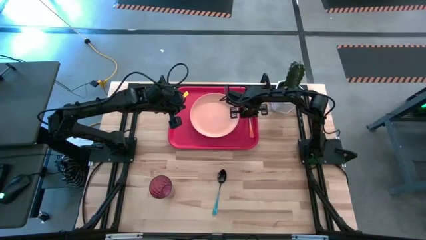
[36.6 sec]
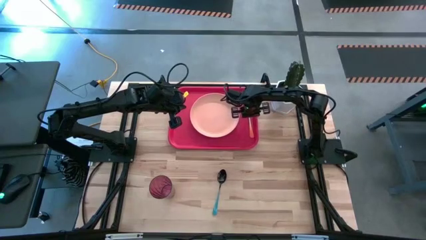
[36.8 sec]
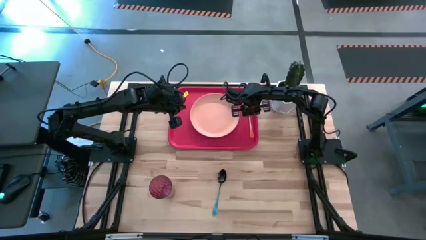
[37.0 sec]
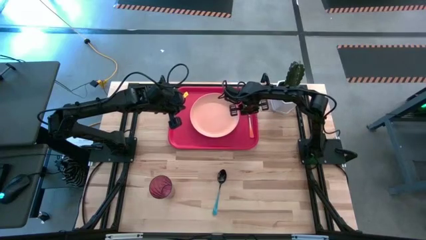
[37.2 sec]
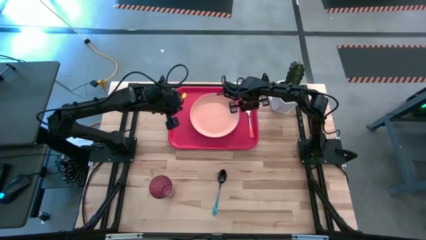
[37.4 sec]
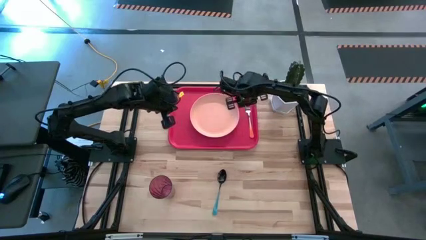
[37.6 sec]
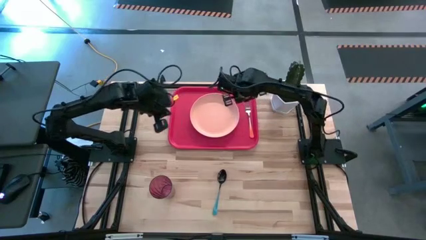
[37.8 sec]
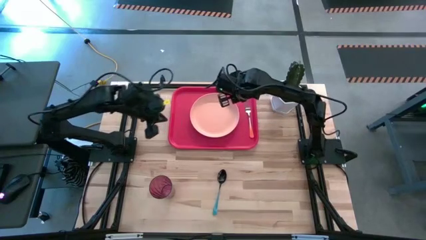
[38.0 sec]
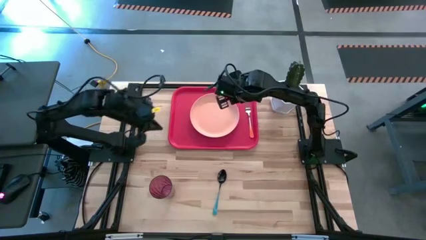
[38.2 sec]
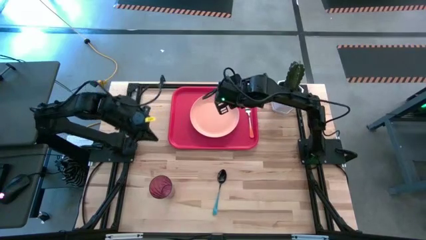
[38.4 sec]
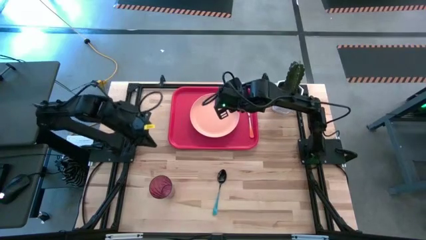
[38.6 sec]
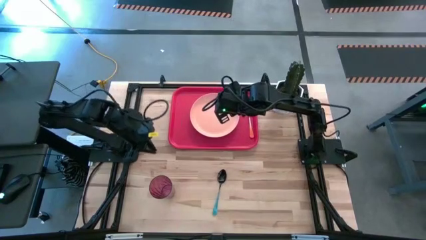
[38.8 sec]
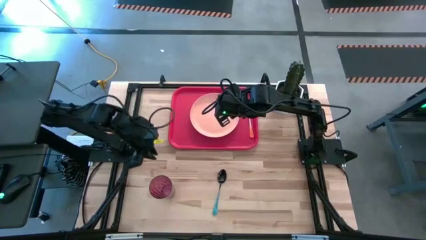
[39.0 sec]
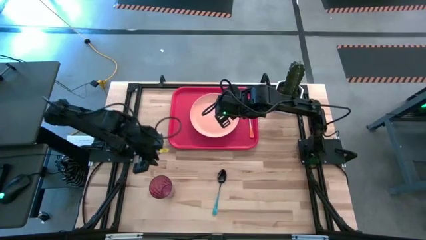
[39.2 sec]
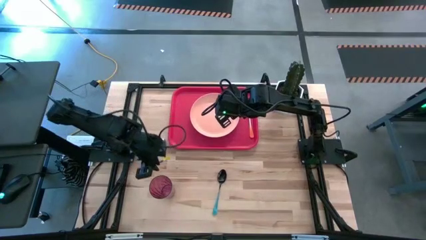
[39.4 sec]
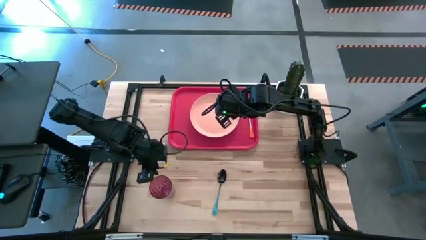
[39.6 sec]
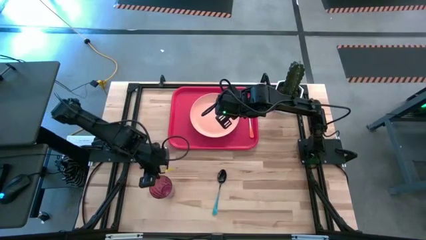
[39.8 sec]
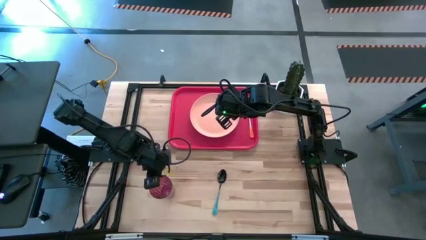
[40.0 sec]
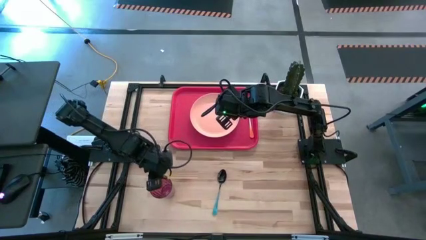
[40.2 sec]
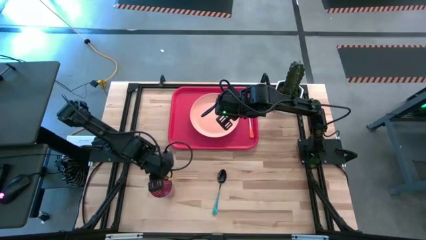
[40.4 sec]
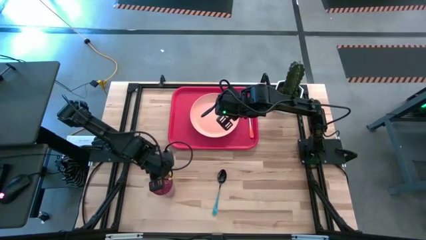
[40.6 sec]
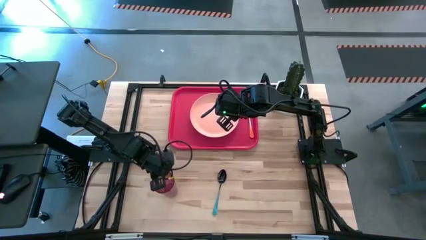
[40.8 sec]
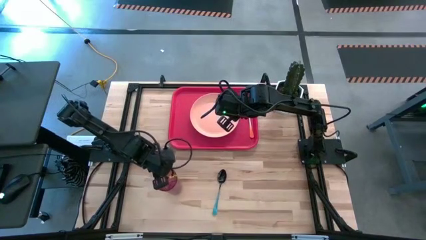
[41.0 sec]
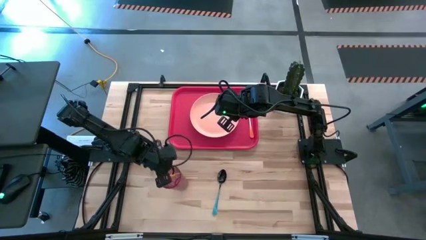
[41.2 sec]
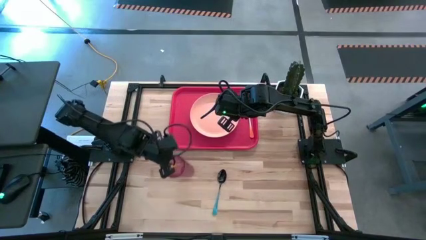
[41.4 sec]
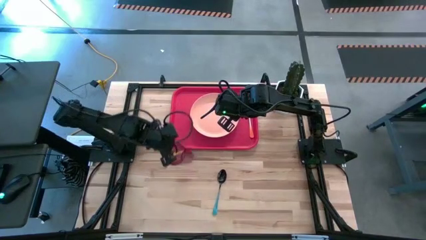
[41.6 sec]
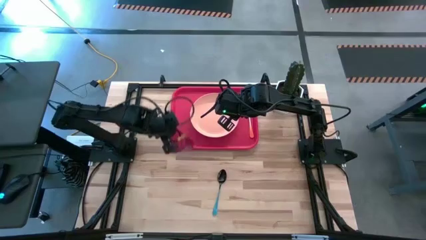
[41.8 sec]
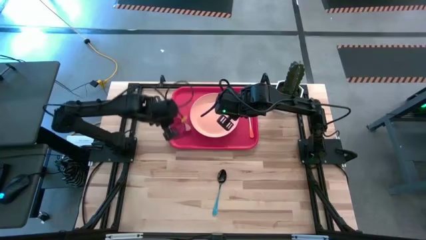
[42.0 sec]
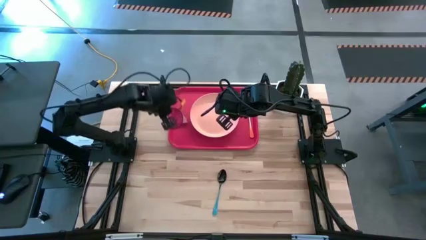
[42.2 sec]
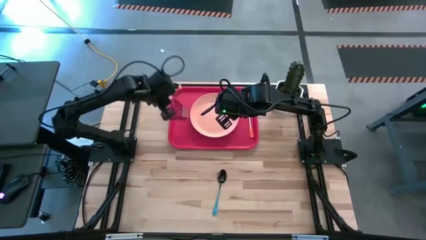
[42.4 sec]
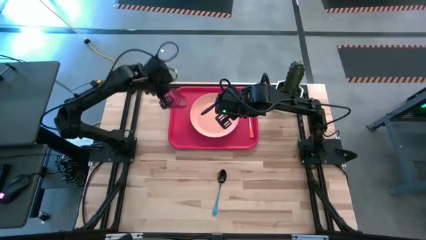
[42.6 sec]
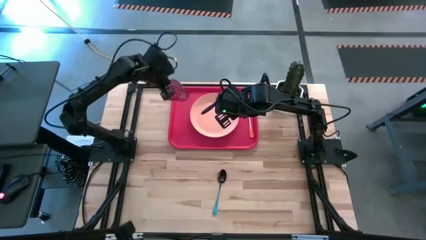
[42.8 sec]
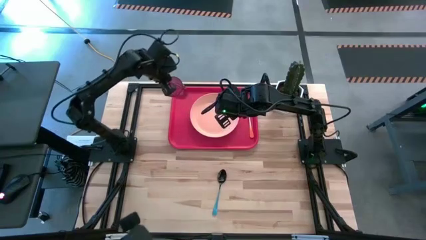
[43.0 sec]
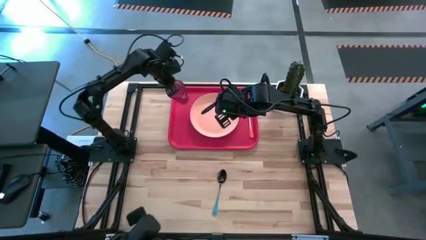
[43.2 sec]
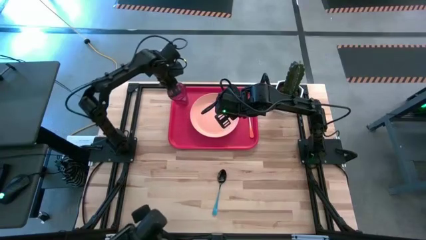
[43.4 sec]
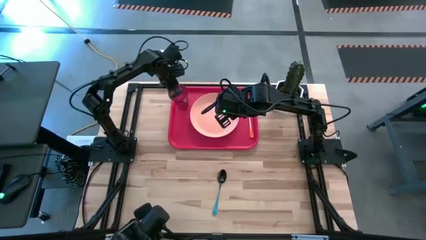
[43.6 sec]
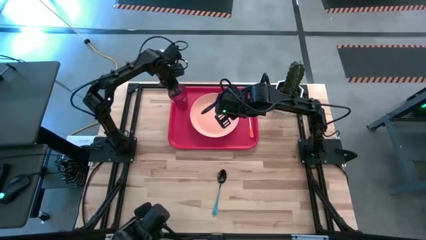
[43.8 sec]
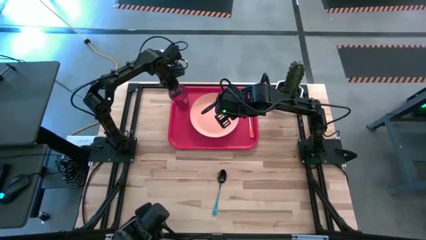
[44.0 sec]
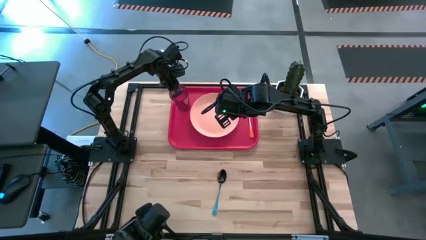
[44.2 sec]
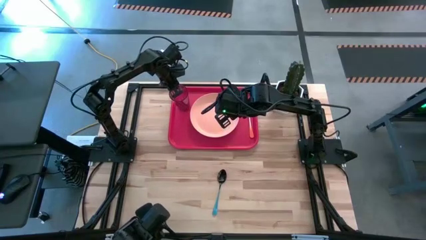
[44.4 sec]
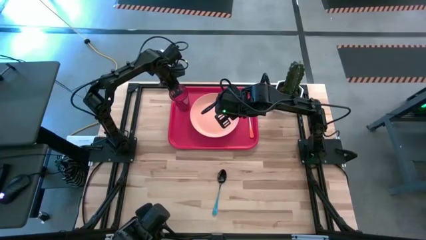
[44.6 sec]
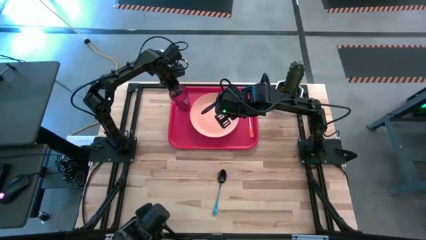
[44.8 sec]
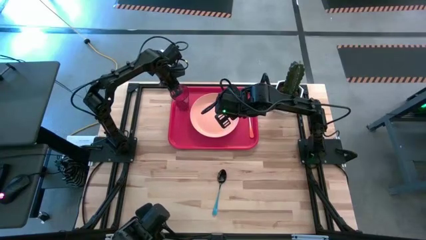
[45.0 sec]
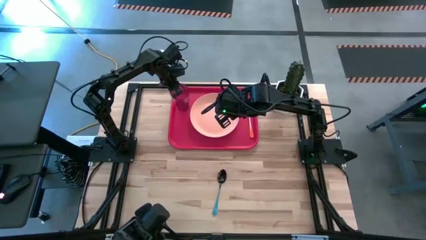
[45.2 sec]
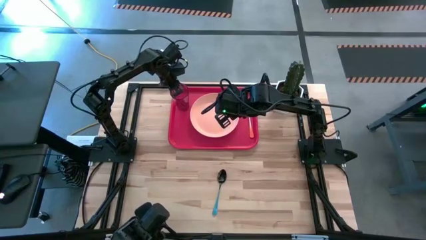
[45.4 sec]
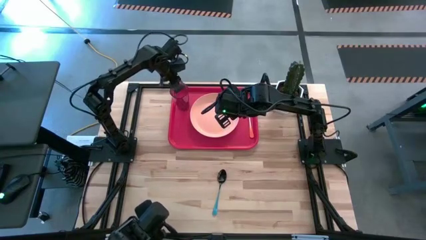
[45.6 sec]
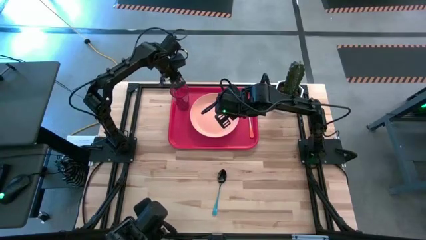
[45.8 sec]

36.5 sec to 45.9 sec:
Task: Pick and place plate/cup/fork/spoon on tray
Put the purple glass on the red serving tray to the top left of the light orange plate

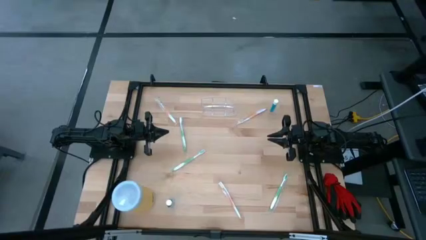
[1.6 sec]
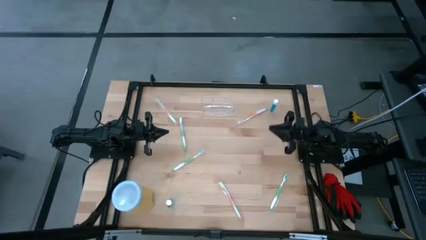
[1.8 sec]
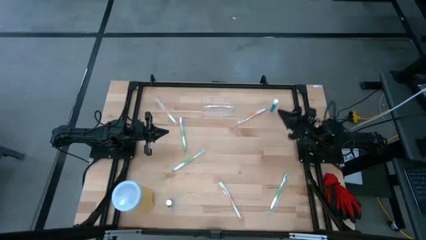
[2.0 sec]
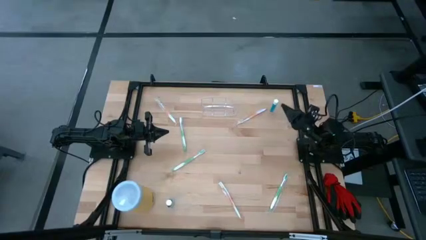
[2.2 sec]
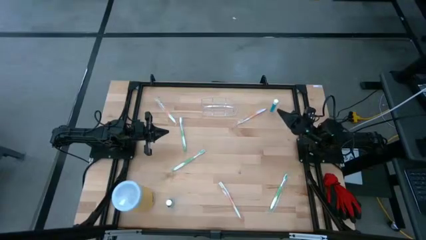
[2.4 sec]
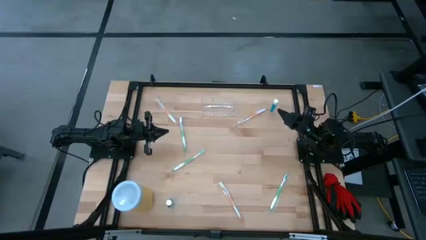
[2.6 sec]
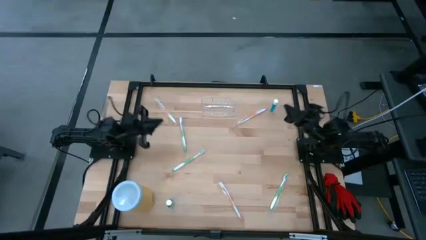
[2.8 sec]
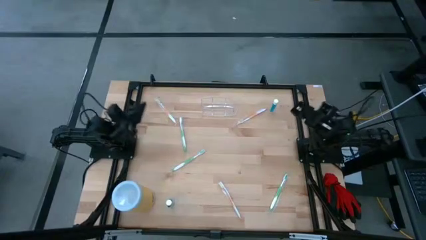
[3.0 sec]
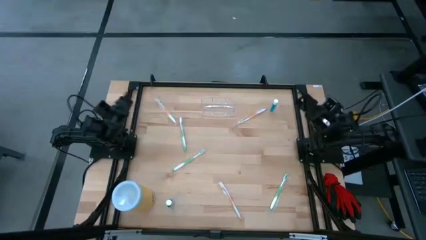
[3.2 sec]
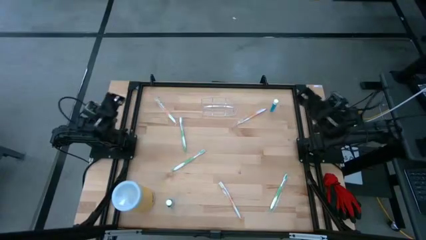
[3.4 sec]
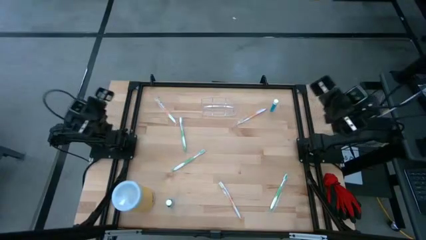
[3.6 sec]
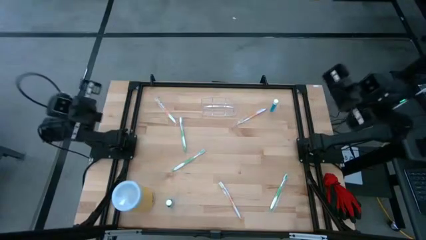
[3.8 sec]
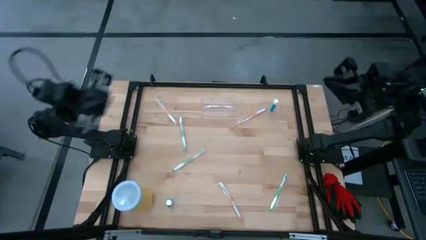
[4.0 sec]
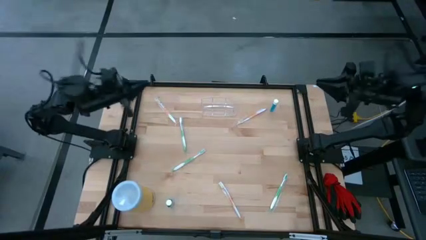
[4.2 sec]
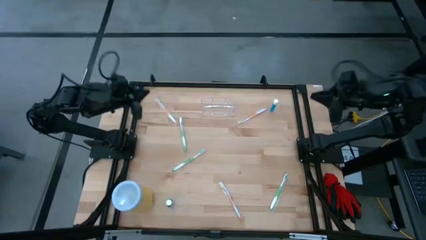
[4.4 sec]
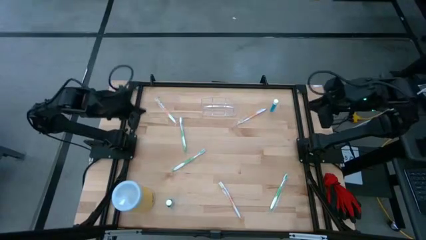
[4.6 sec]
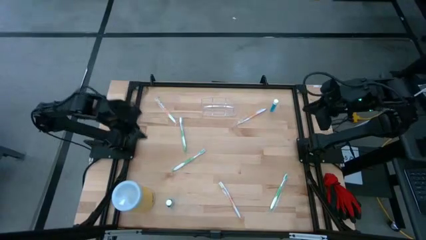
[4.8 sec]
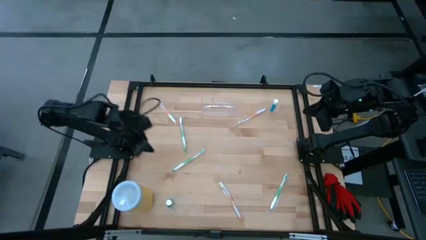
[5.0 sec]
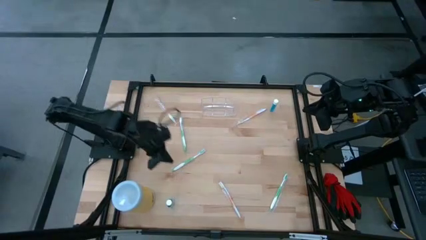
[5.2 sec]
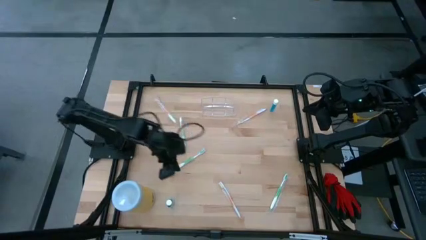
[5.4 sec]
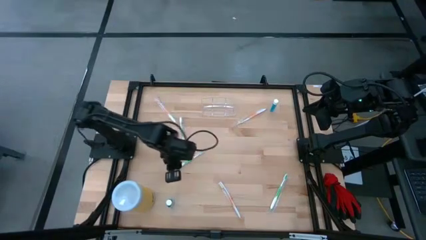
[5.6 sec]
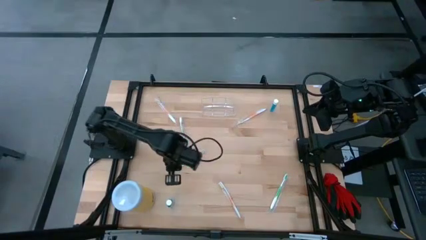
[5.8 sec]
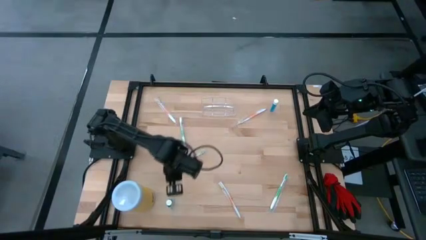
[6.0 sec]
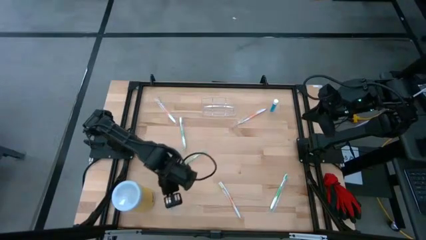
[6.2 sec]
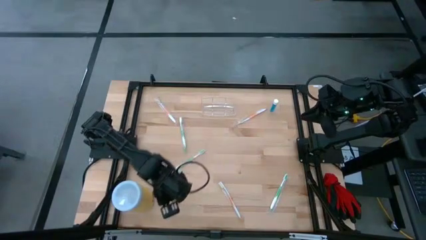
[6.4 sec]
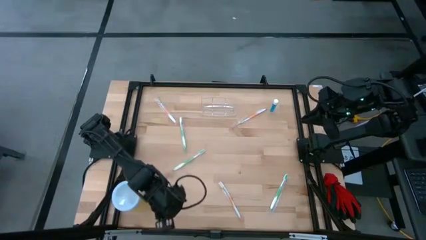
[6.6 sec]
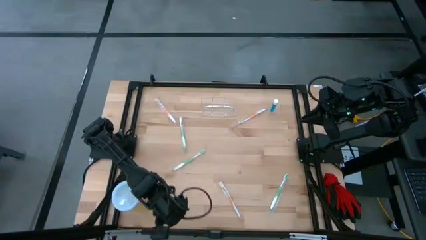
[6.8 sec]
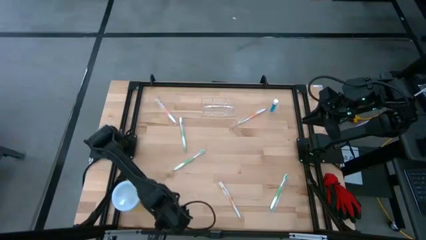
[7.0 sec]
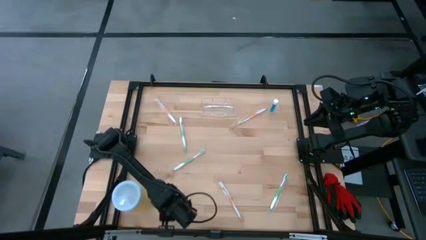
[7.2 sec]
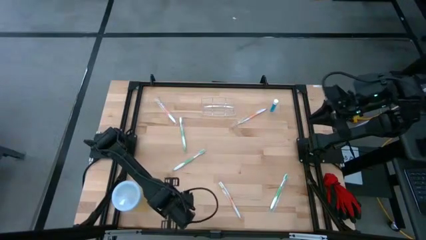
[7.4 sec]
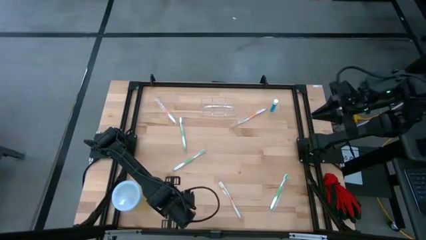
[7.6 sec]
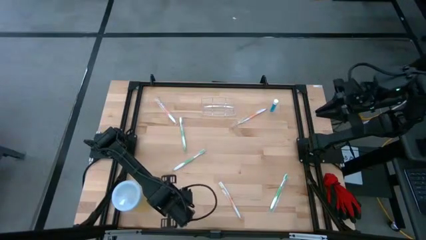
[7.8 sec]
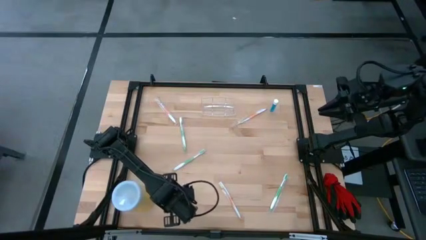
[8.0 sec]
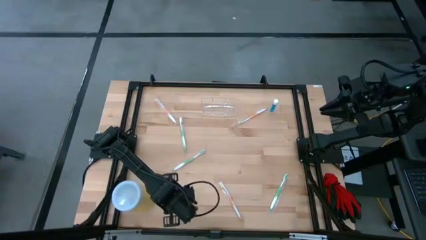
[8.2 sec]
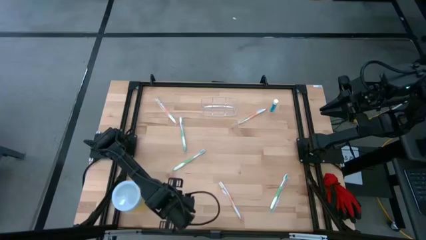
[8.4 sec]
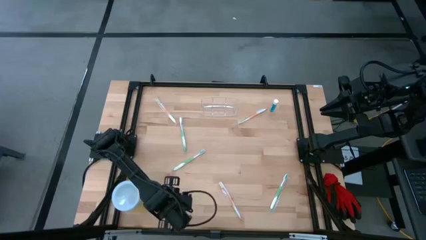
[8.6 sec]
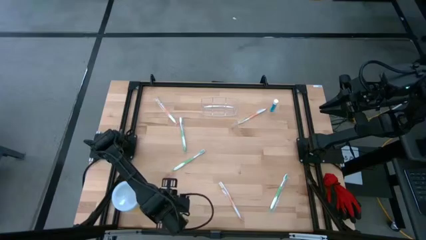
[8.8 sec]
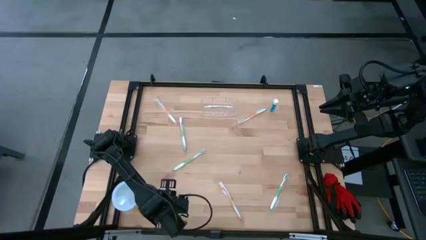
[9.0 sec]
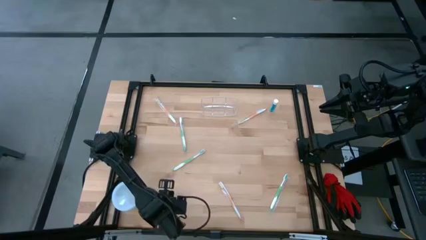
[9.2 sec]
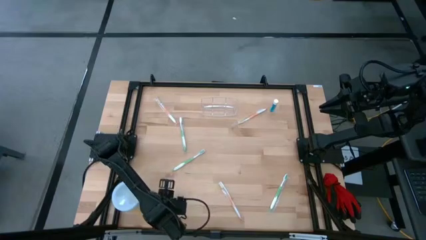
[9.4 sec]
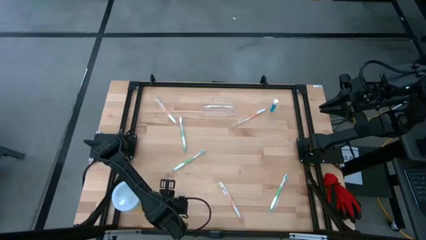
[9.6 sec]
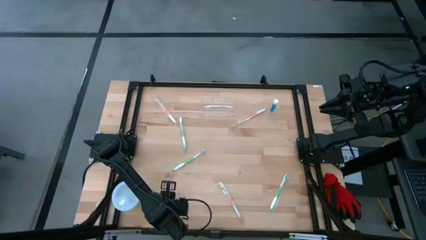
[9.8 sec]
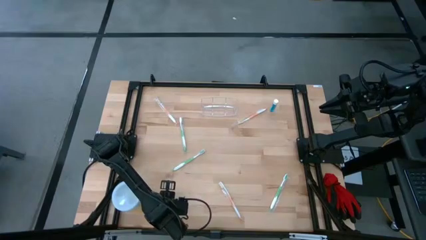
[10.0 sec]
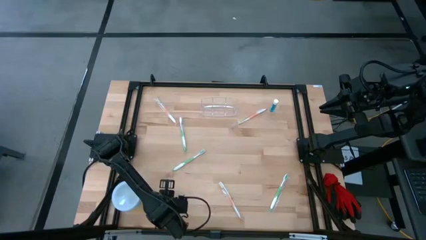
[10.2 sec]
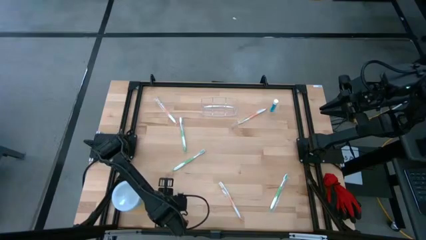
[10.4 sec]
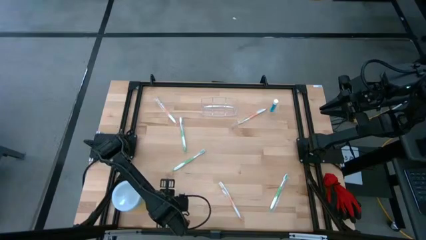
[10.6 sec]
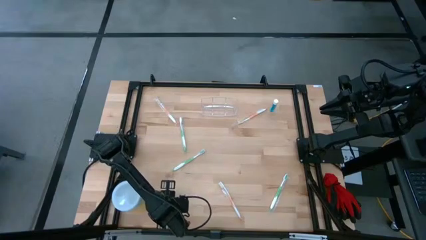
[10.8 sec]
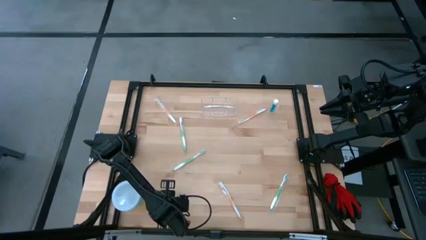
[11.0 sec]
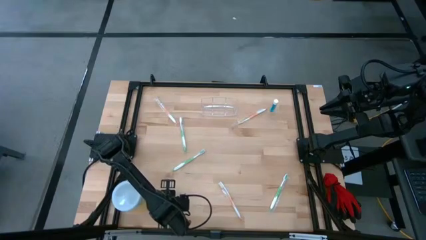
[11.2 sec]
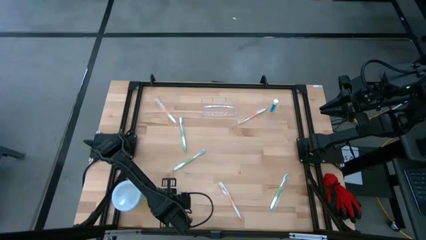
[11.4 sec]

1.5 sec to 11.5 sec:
Task: Pick & Place toothbrushing station
Put the bottom blue mouthwash into the transparent organizer
